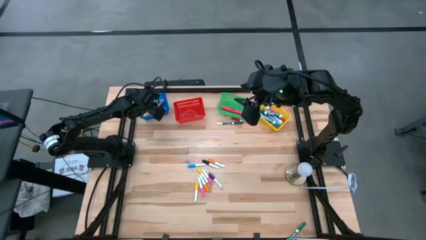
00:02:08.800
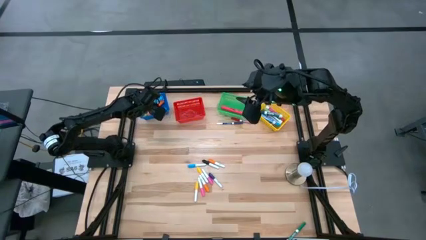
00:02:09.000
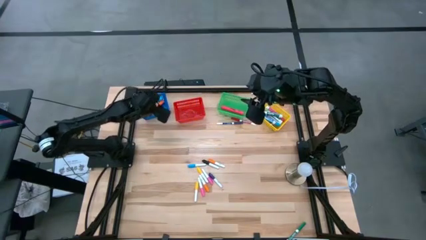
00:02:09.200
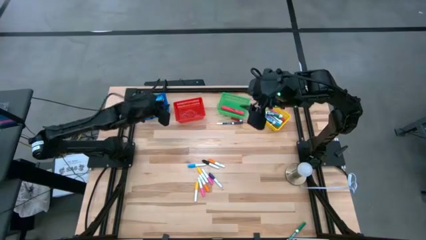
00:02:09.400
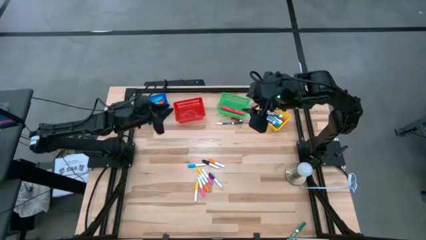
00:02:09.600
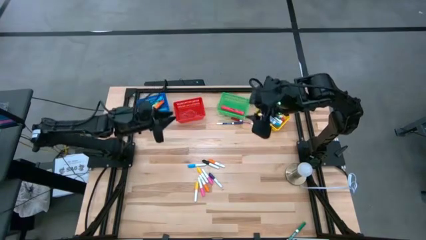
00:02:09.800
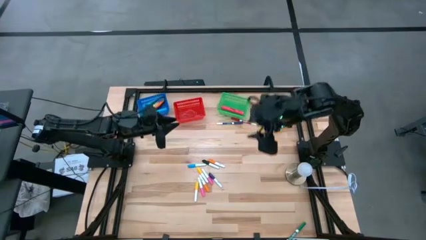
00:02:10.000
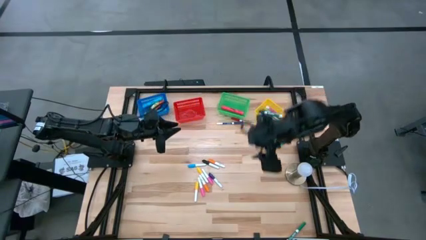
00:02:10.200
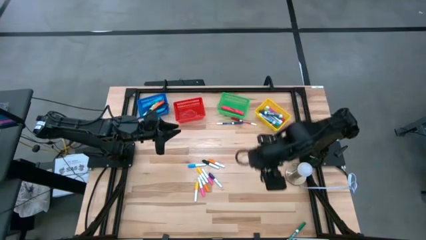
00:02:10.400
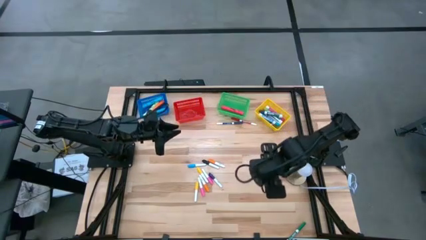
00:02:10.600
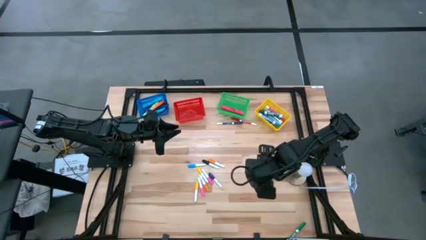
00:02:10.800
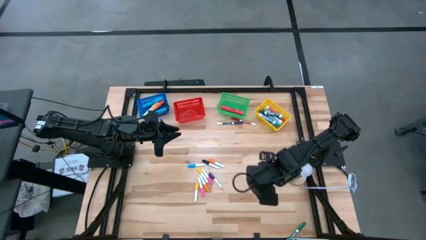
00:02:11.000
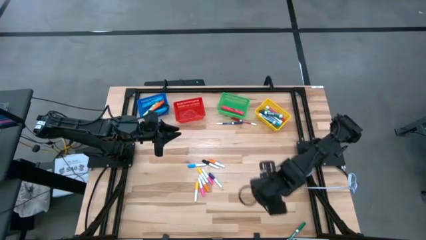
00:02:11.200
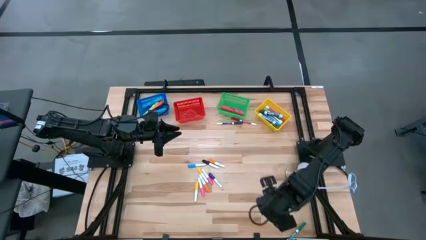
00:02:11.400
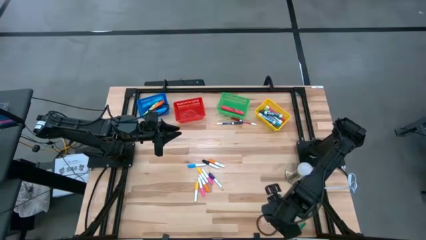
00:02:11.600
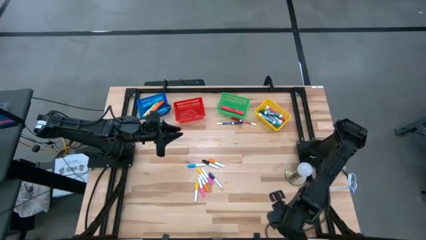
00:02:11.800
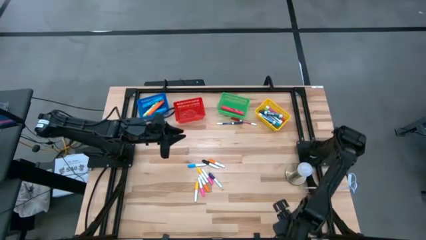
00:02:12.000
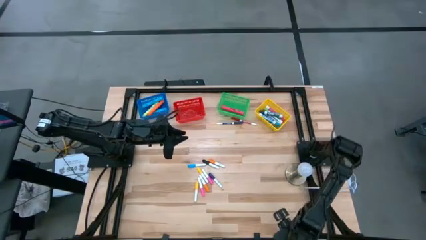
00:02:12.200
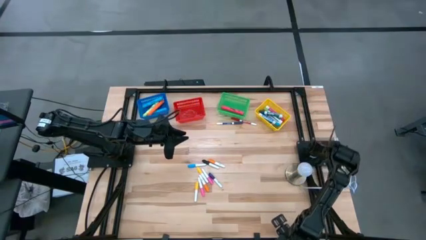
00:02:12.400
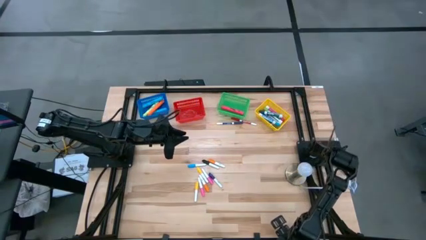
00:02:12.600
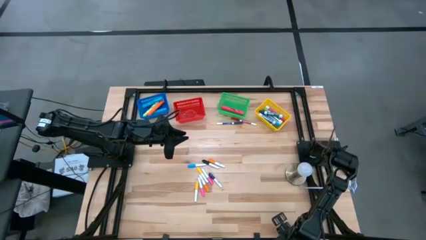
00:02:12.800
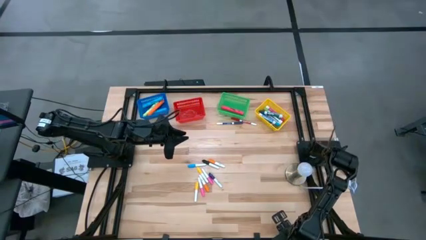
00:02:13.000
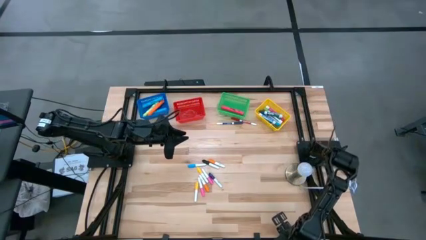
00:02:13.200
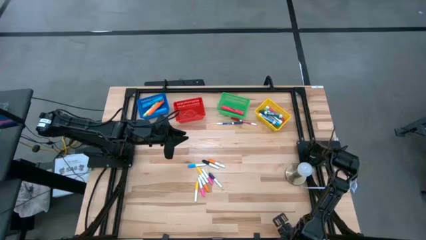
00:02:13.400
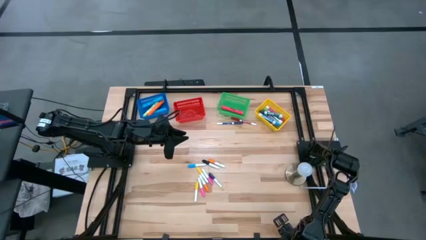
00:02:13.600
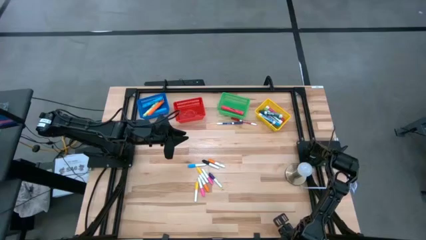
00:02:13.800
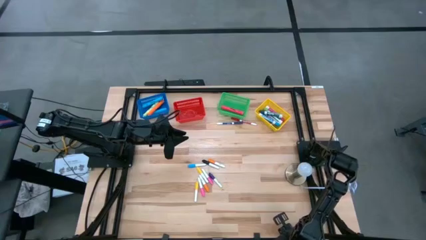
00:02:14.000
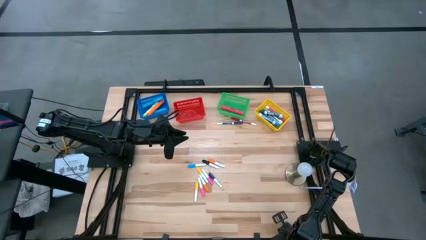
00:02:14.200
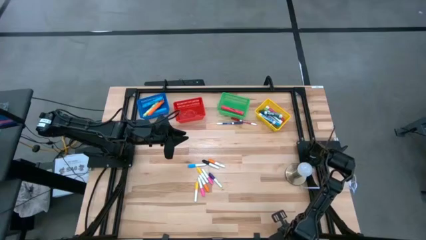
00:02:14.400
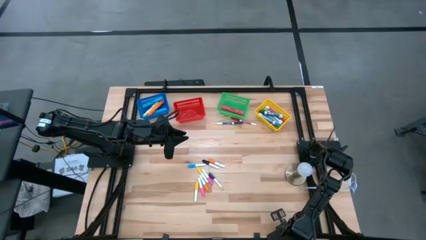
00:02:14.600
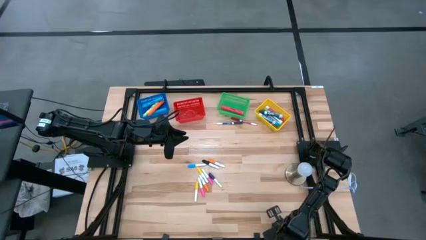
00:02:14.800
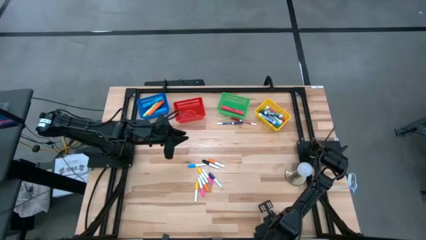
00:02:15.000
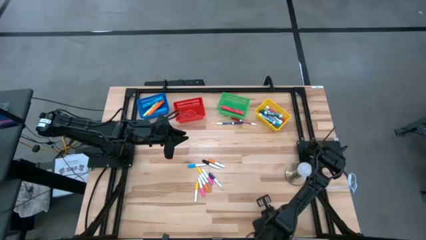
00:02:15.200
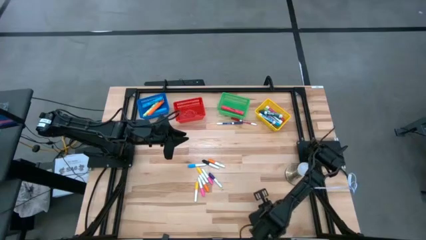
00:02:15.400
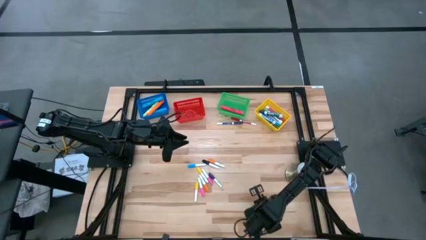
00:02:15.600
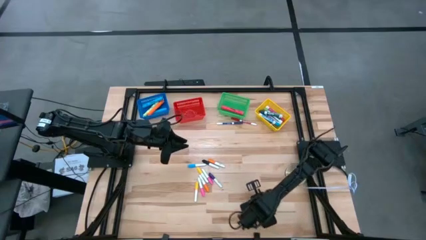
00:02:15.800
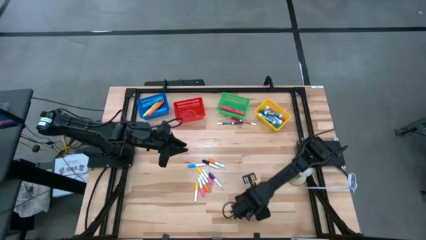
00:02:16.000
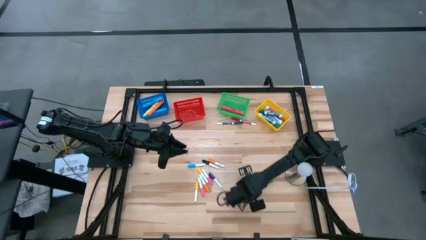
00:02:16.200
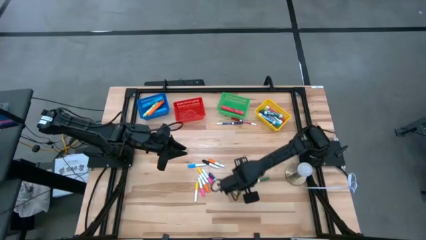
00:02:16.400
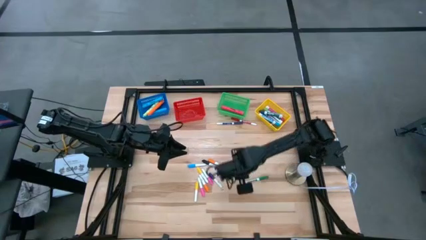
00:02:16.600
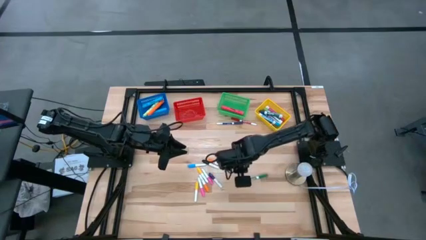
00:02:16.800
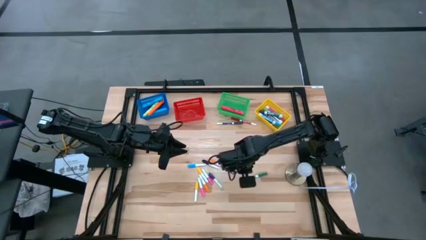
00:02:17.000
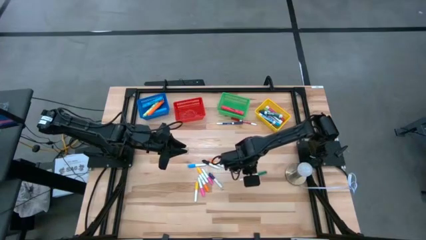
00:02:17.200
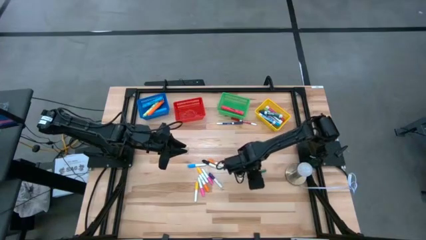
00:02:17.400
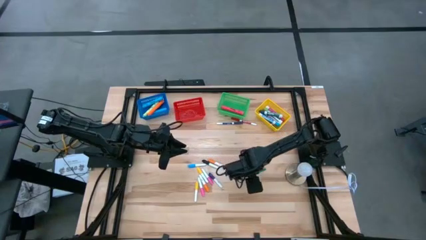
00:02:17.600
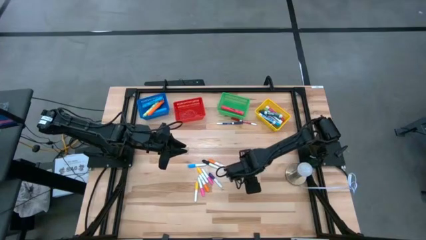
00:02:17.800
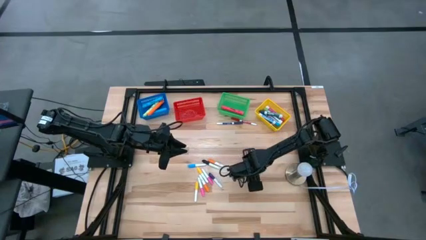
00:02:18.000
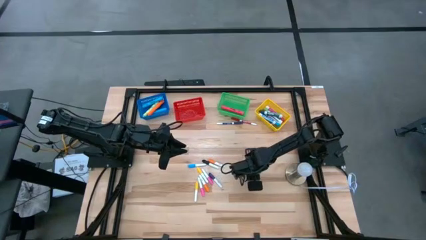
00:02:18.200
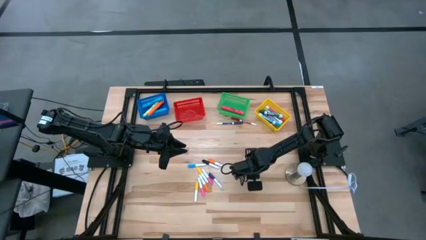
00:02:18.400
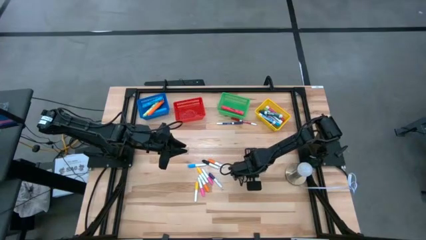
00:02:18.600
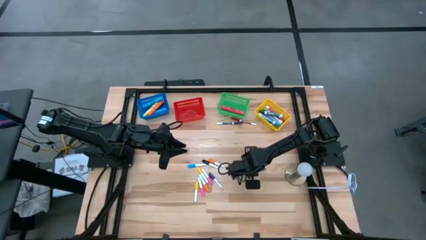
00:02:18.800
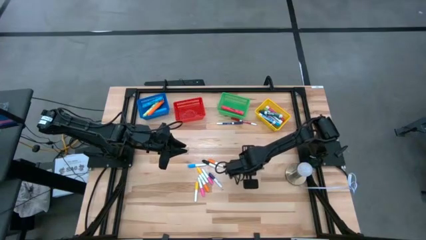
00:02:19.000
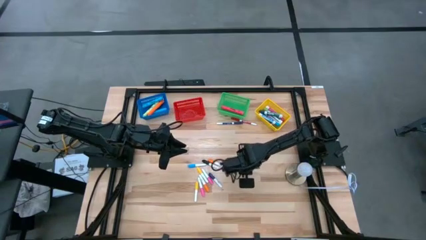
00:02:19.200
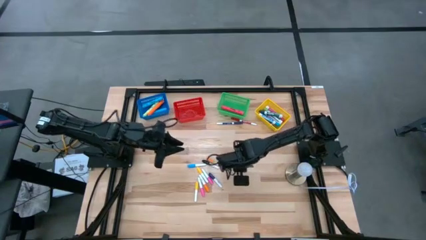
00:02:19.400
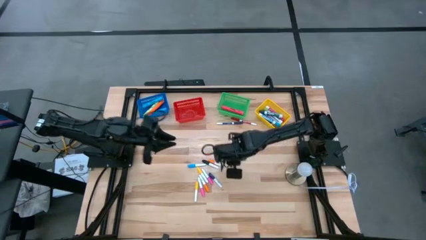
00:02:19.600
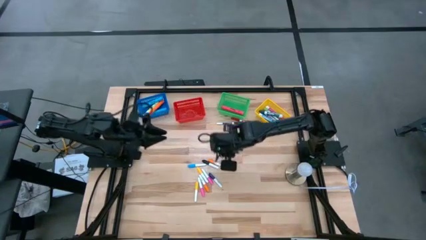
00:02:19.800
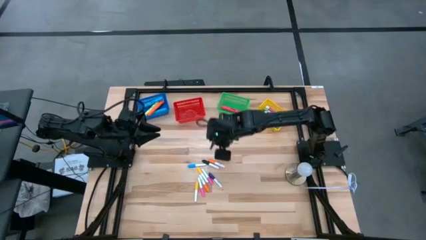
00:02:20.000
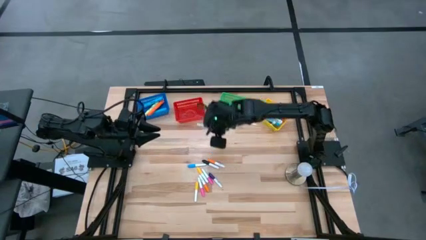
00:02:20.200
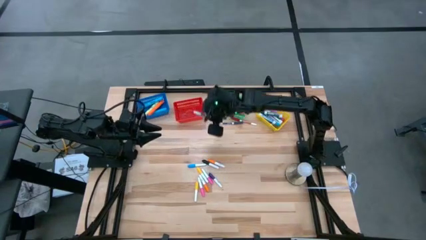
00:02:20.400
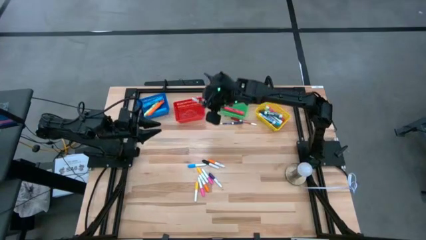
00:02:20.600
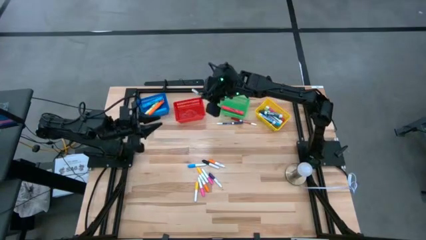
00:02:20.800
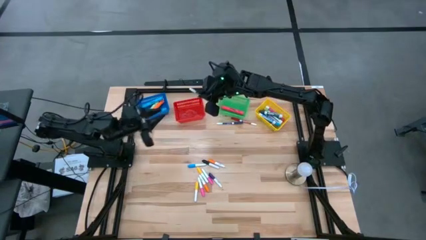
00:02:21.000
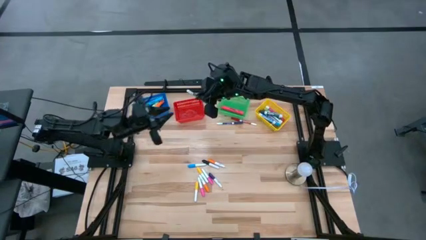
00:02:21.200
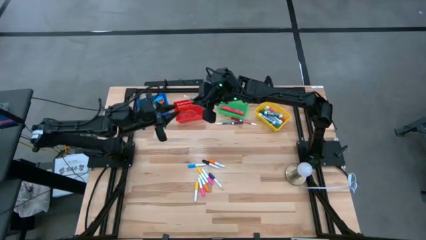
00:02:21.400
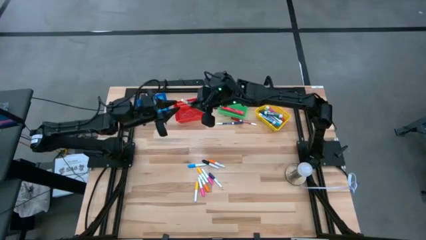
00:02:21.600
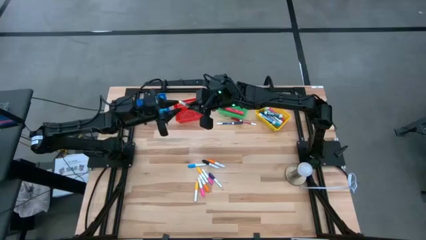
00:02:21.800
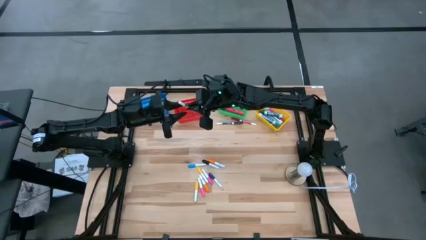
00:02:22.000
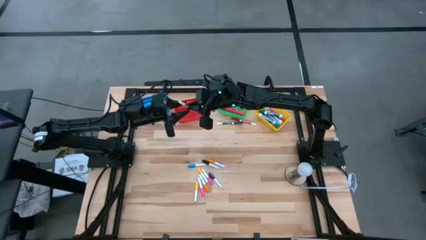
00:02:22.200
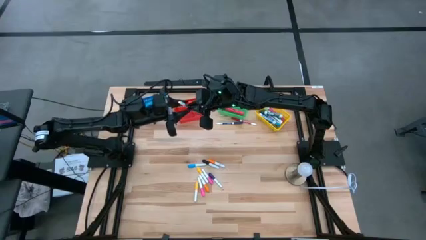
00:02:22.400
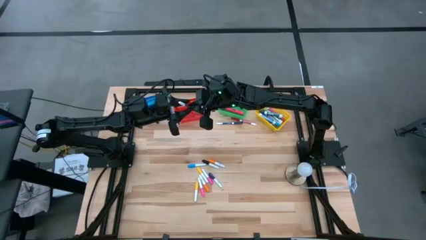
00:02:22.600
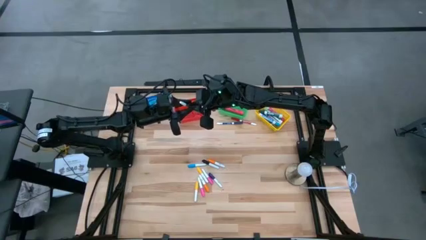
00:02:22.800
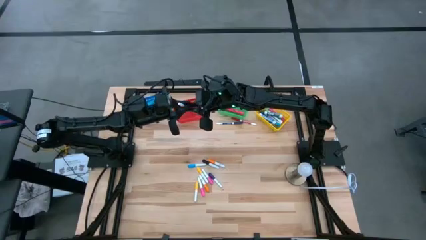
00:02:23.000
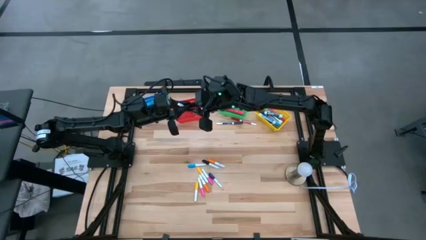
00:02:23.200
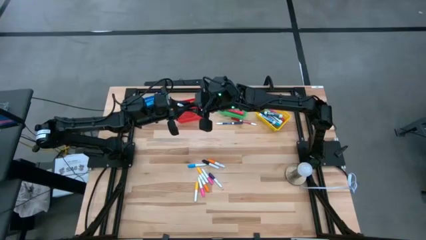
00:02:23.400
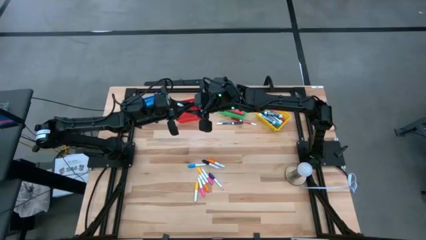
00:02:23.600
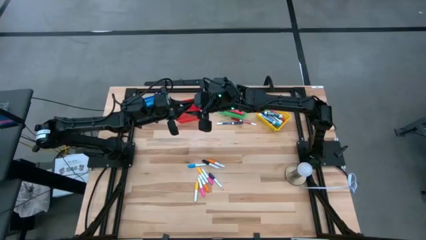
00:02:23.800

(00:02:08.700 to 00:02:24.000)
Task: Pick & Place Markers
Put the small green marker pen into the red bin

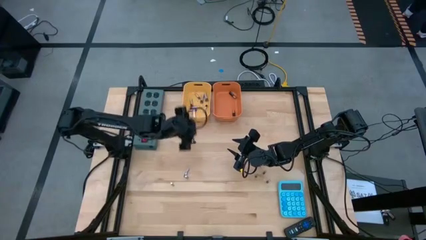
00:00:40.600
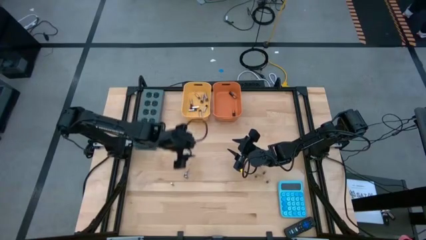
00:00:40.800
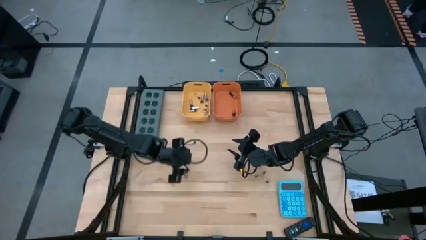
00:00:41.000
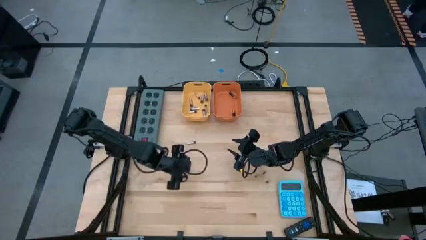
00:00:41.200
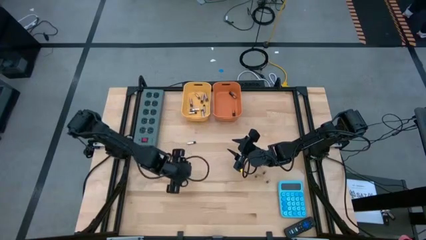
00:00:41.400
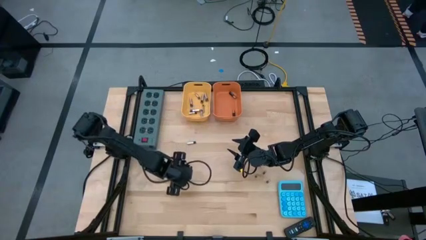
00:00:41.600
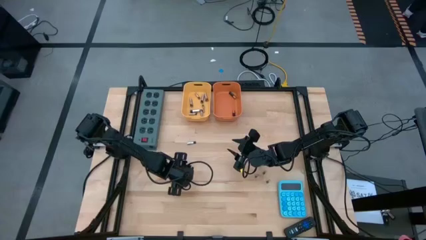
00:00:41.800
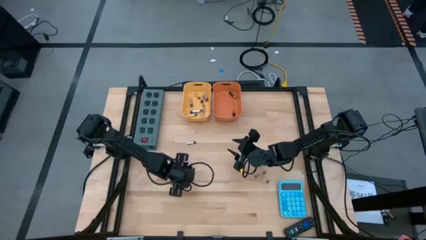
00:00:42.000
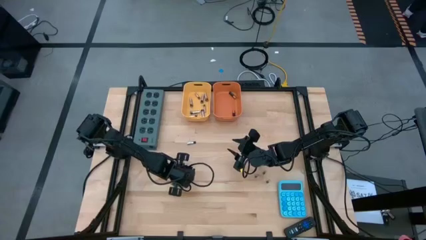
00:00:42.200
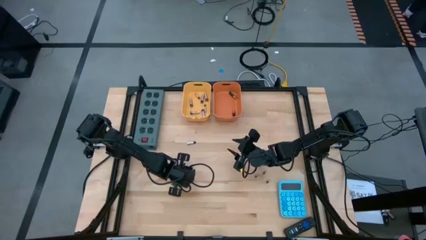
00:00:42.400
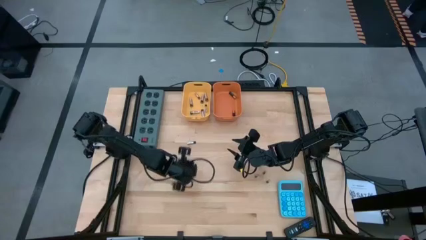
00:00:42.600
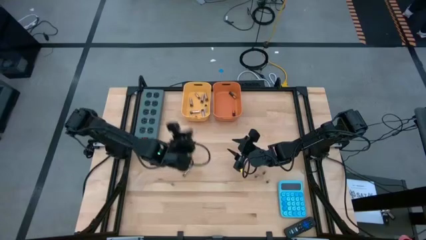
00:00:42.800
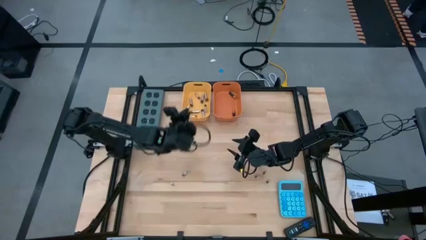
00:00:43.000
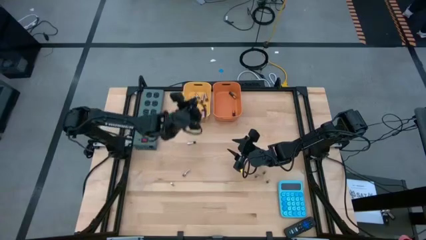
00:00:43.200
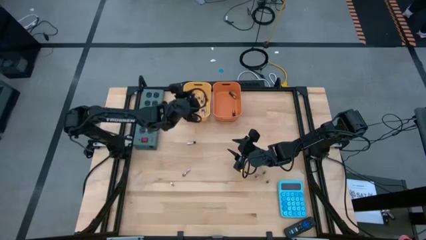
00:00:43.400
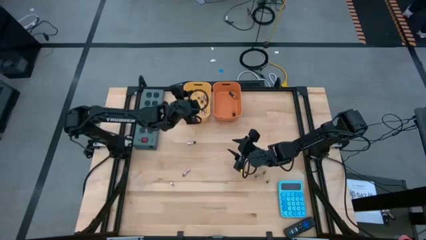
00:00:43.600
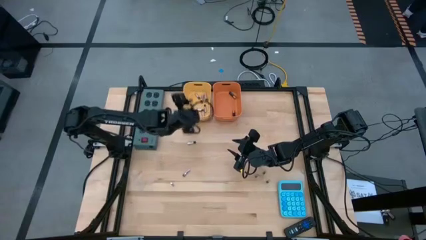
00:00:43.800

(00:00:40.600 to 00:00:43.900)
Task: Sort batteries
Put the silver battery into the yellow bin
